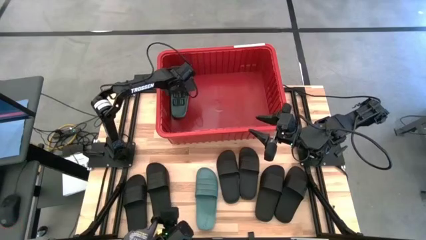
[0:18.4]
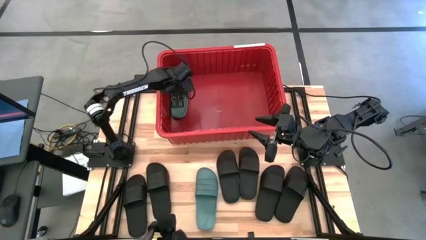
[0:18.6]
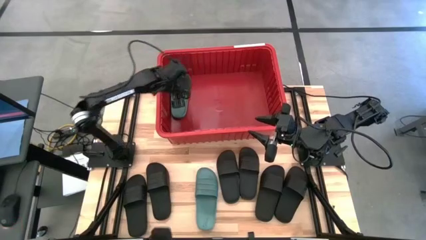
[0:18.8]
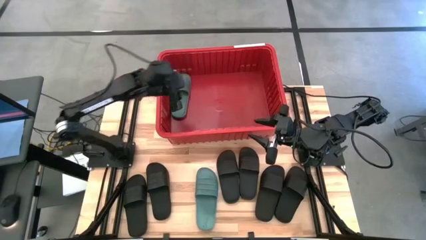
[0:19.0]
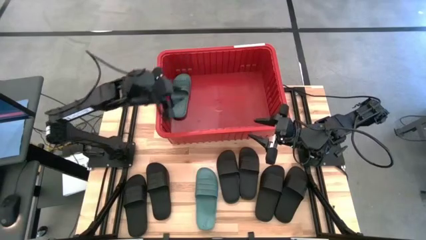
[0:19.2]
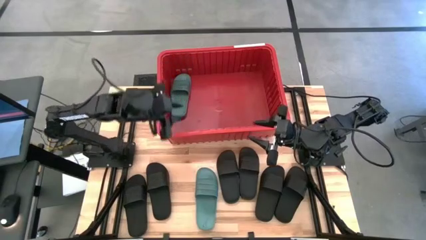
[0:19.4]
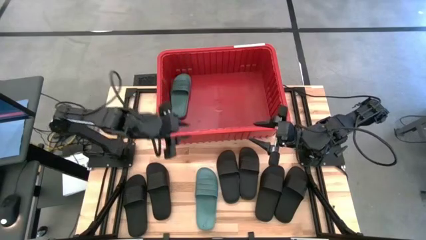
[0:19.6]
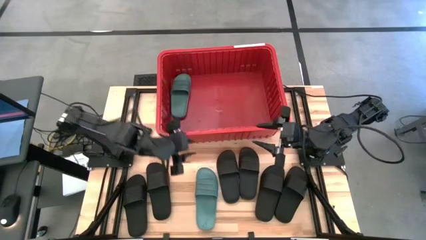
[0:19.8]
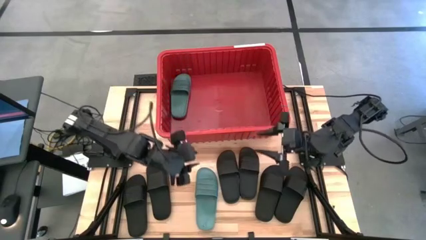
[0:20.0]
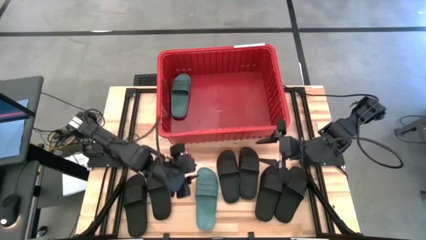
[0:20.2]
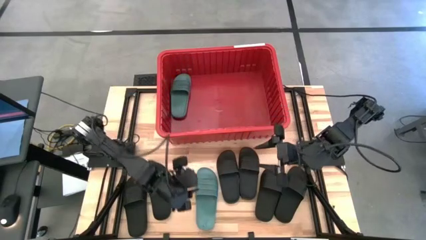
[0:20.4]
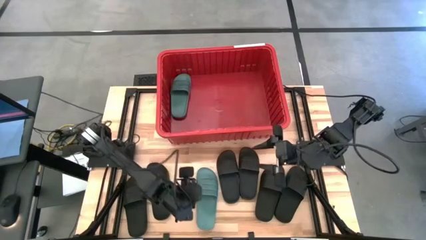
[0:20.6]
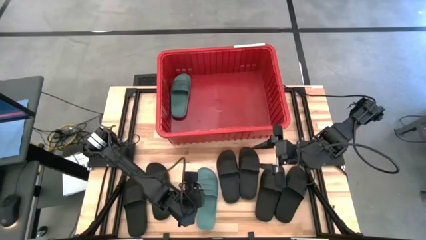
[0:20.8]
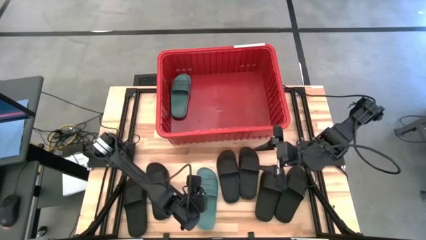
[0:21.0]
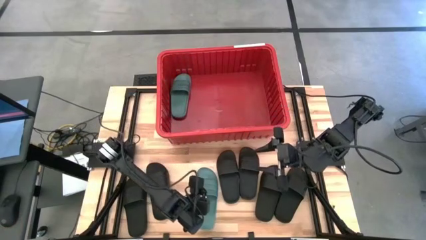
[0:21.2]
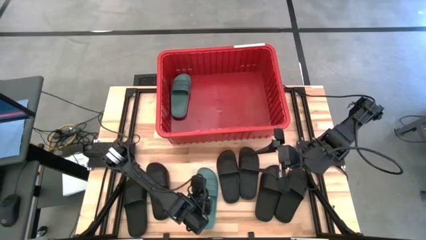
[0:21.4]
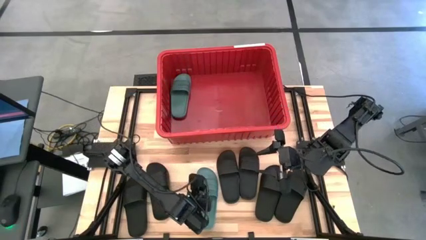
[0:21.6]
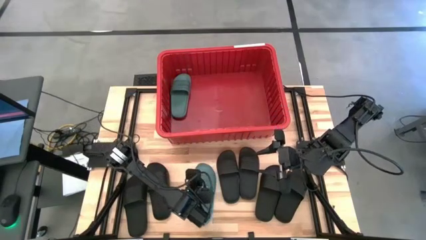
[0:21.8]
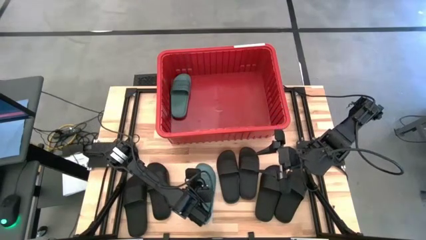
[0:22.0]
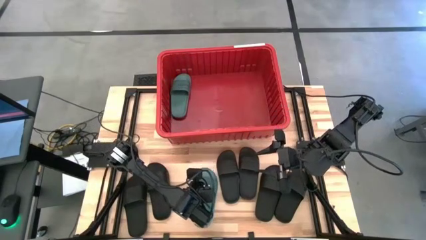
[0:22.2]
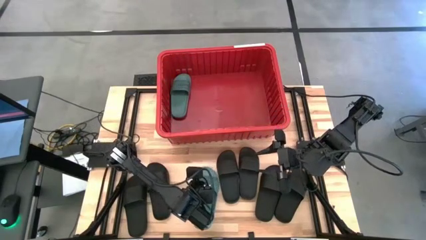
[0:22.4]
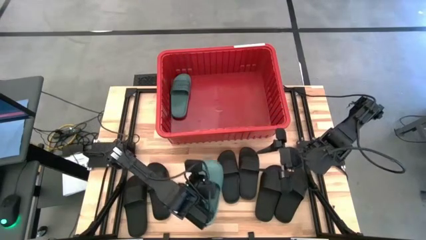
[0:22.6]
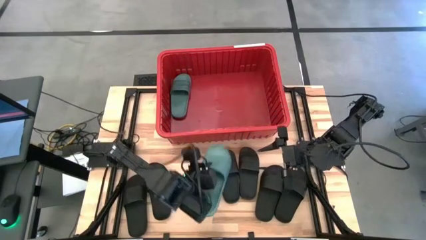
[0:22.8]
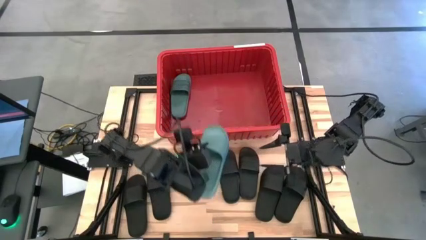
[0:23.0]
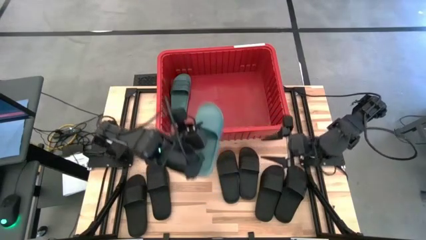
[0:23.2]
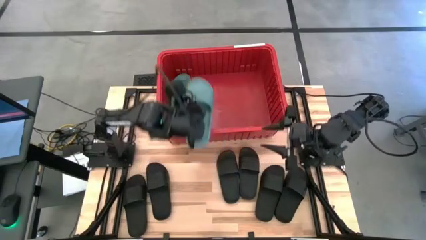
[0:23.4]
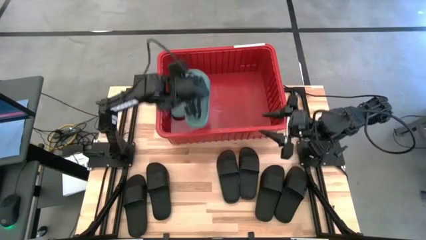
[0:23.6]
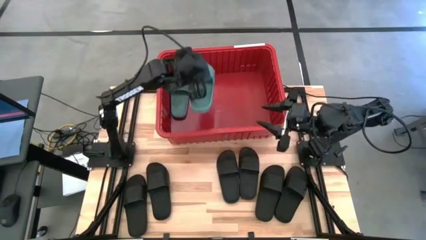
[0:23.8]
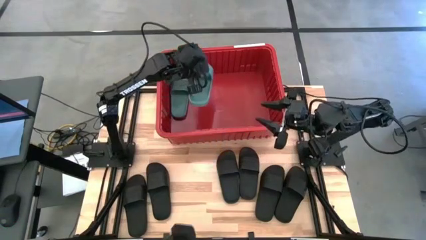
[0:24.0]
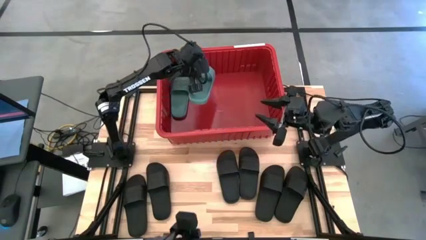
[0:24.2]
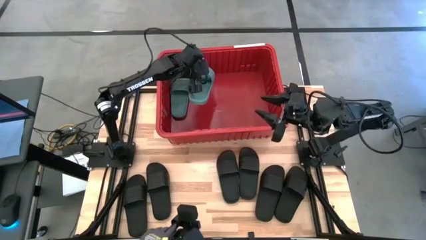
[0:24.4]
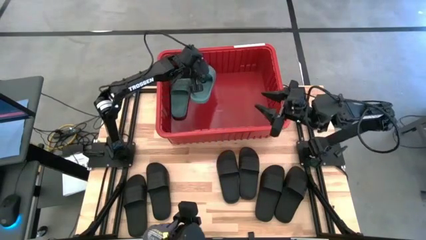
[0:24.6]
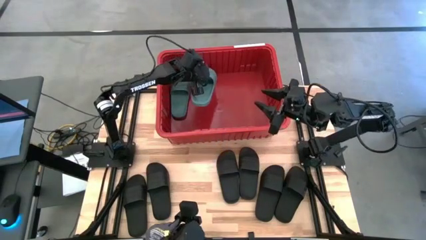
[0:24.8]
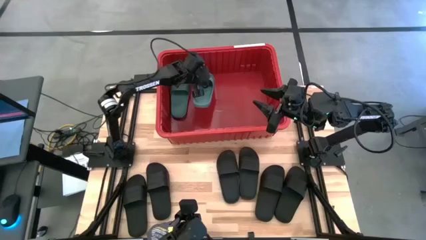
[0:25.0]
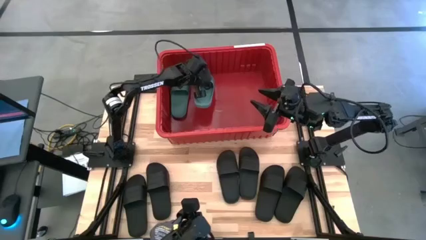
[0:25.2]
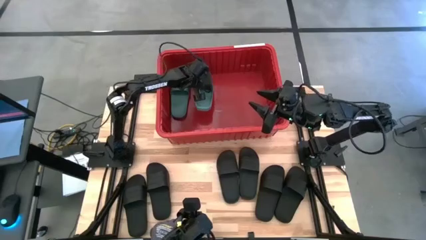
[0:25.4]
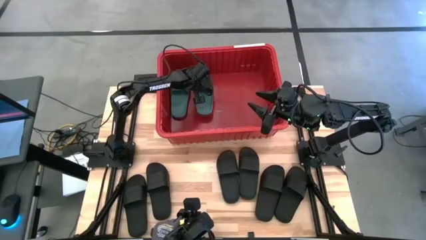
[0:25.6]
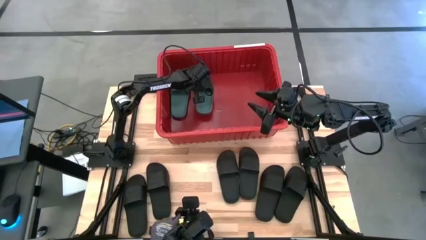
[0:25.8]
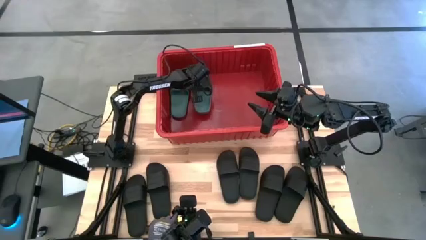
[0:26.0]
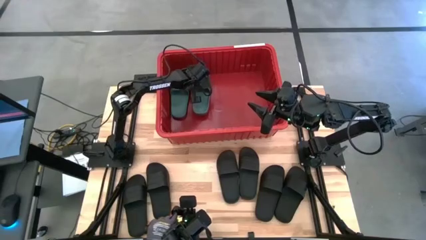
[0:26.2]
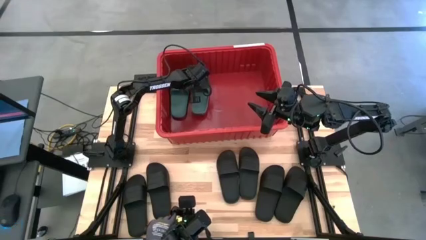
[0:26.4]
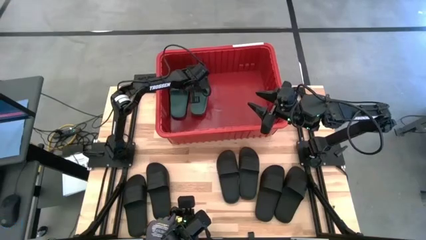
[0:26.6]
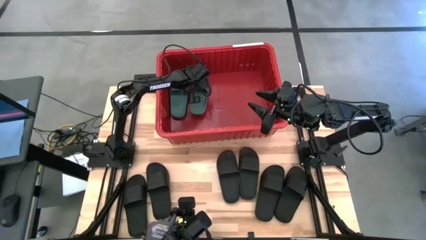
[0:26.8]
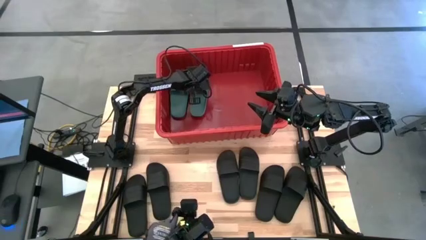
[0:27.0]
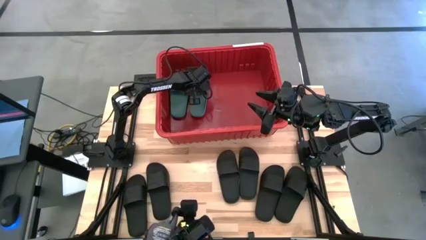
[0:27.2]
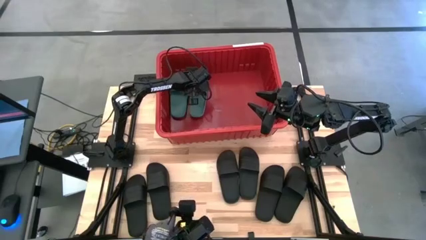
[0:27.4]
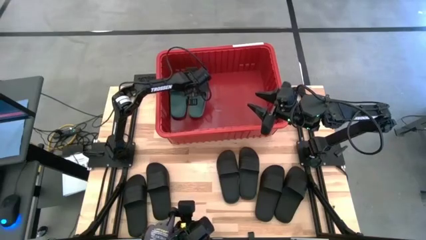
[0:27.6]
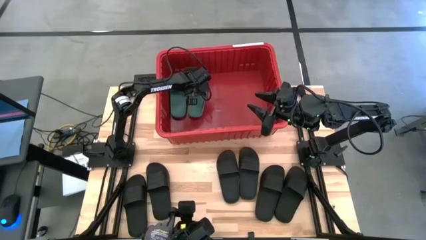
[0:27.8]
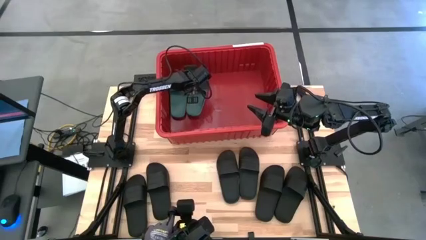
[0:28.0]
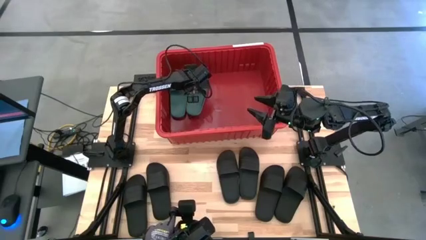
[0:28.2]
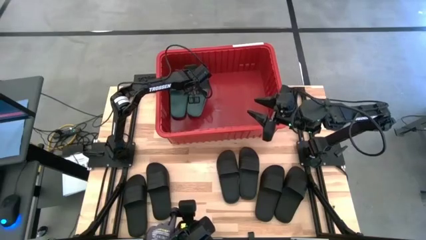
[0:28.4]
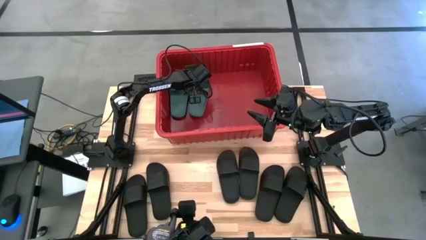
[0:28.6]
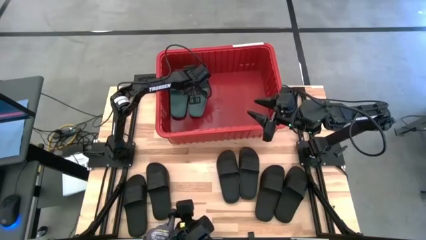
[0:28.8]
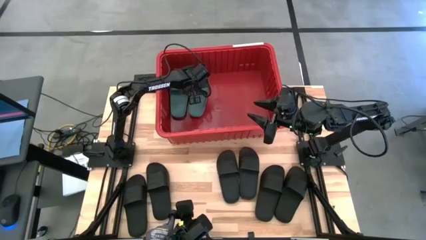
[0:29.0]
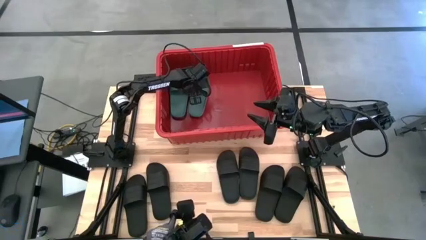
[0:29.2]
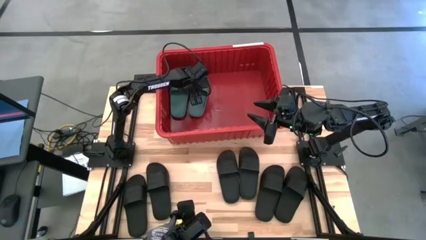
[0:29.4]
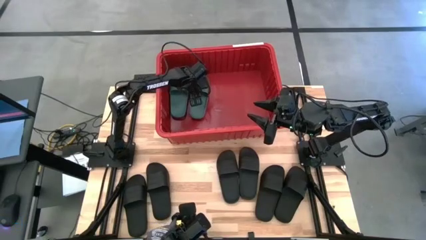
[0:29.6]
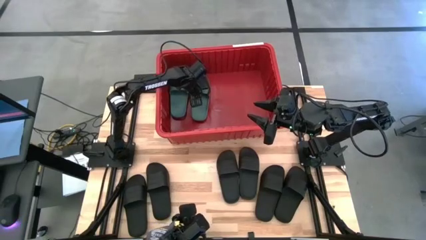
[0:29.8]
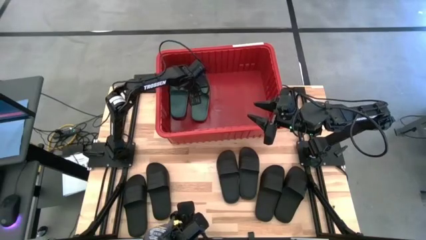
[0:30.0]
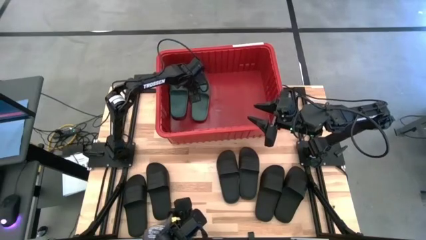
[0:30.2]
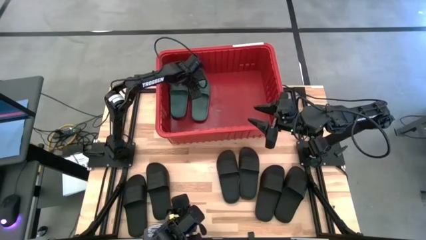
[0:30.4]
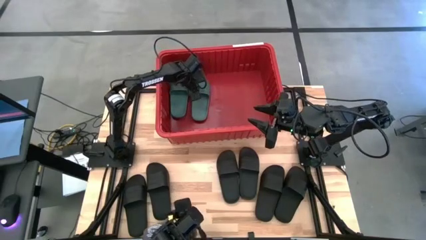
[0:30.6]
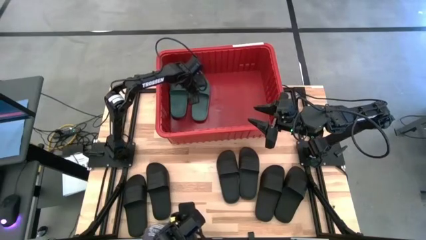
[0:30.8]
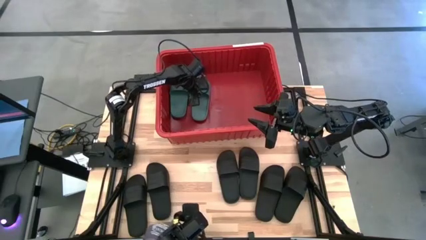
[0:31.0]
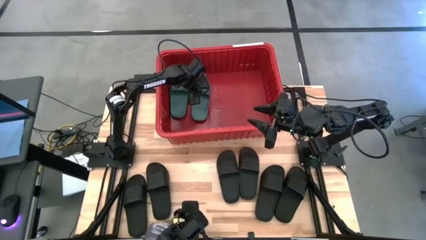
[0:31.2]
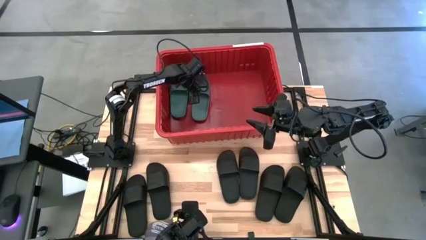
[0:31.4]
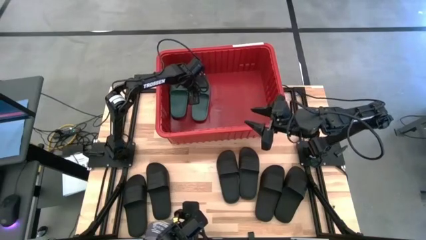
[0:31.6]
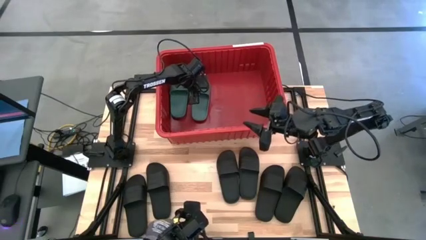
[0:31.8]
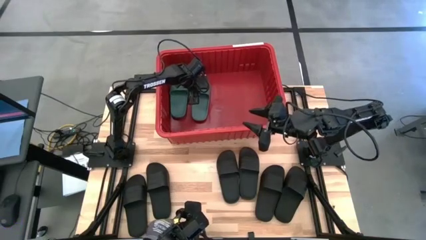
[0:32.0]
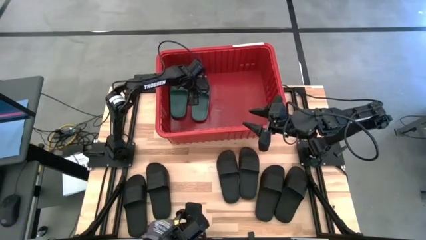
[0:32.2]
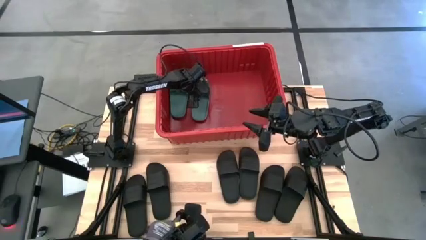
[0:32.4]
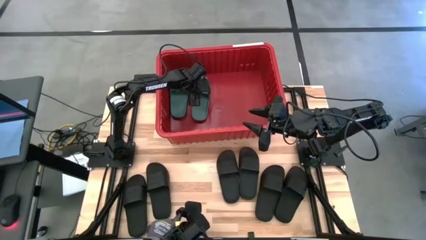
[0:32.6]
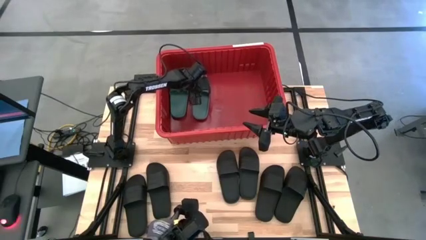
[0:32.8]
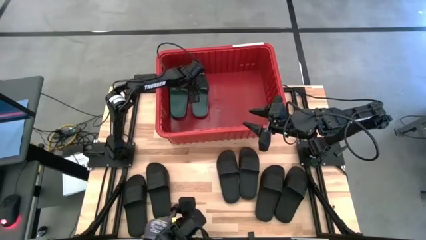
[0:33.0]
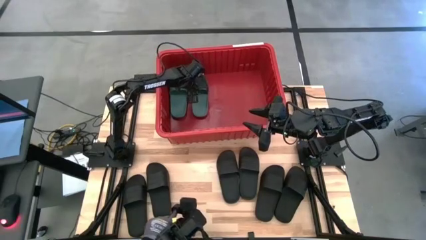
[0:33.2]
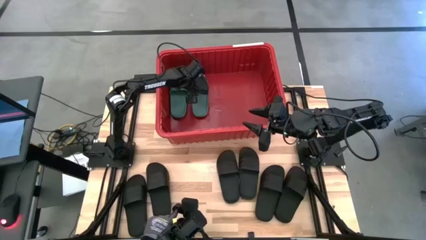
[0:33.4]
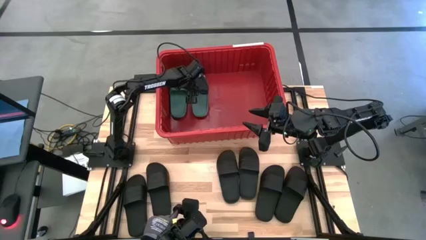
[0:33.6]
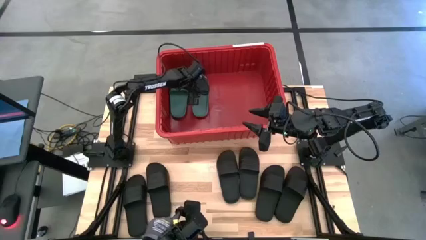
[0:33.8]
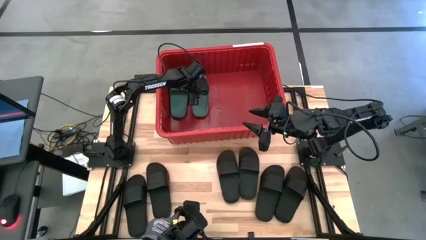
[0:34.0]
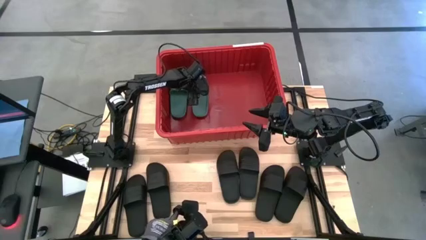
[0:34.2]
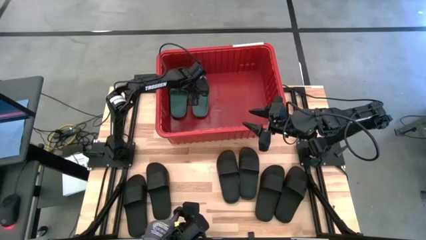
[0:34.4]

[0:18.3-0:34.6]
Task: Pick and place slides into bin
Put the green slipper into the red container
